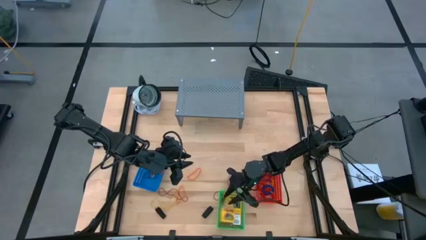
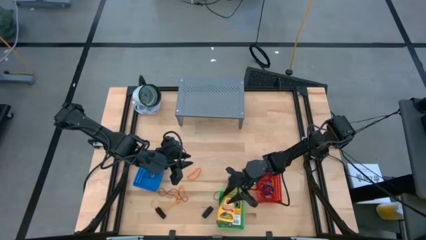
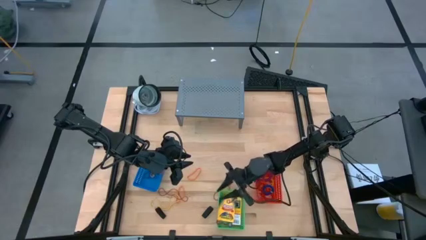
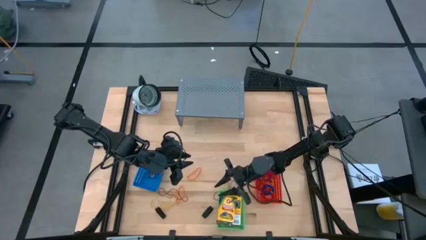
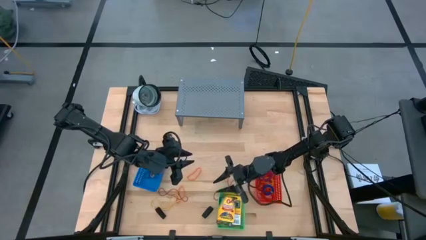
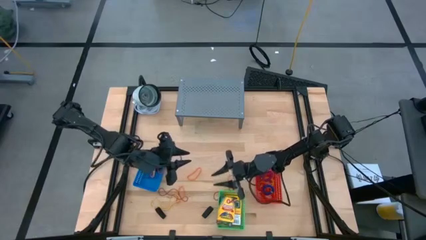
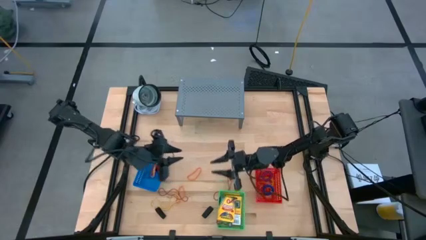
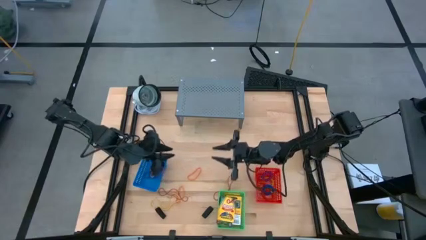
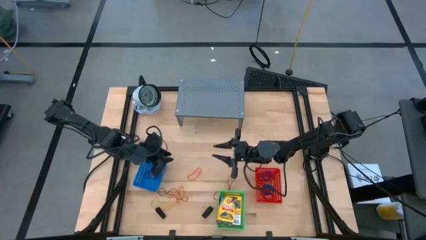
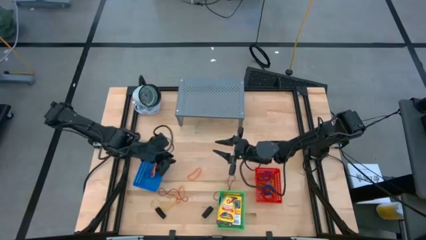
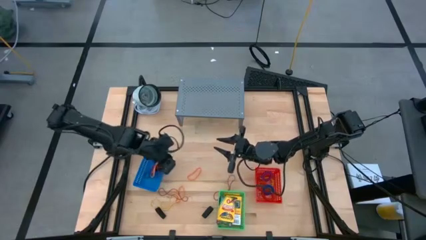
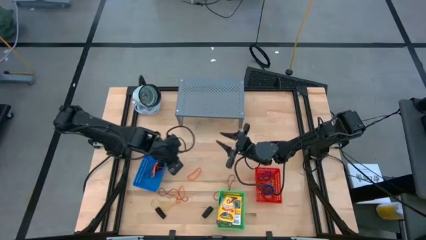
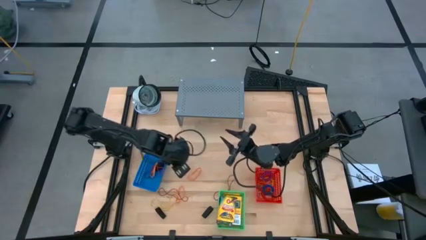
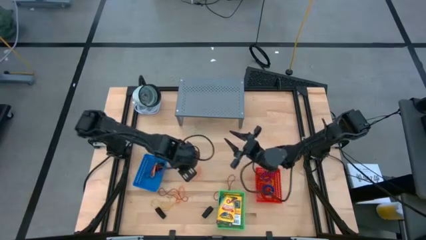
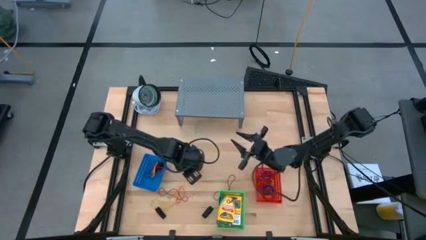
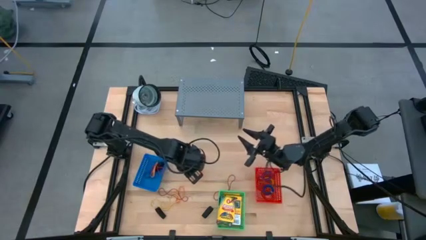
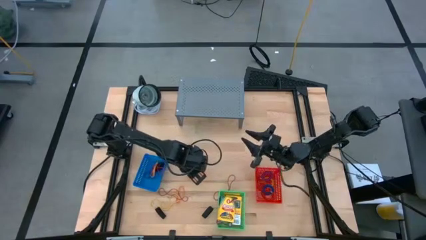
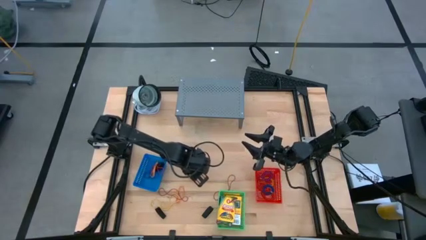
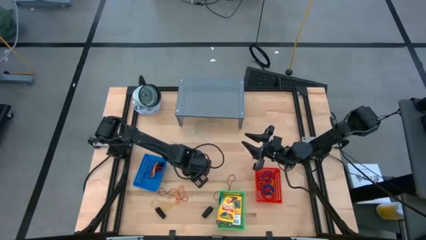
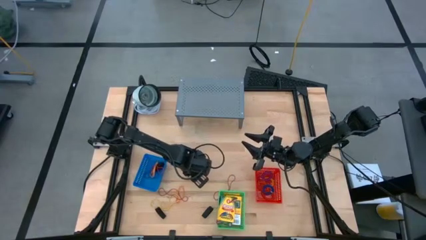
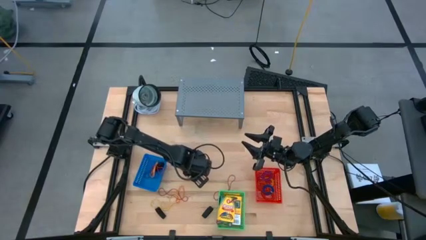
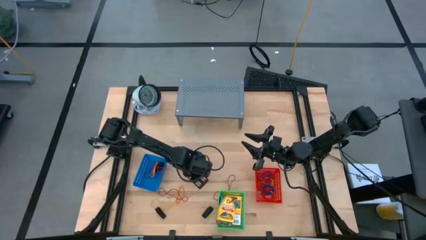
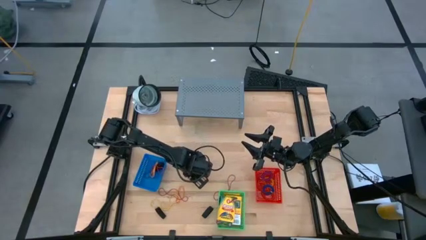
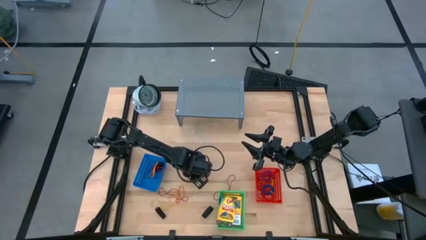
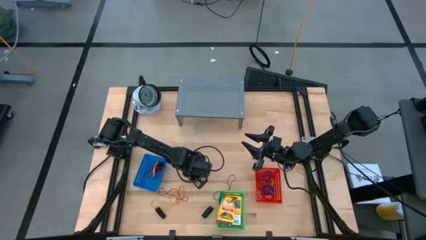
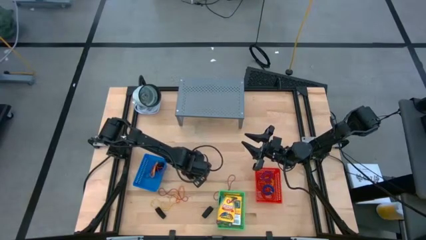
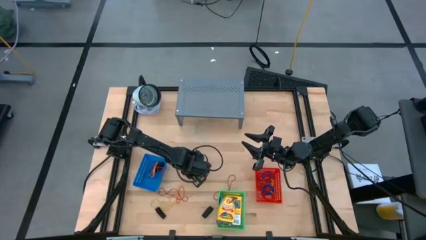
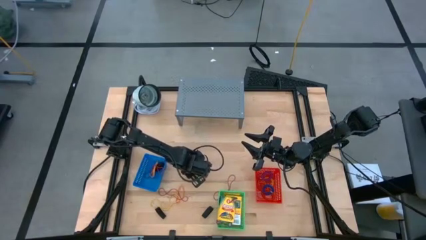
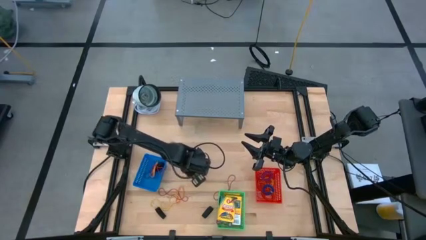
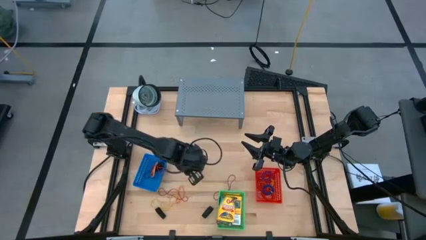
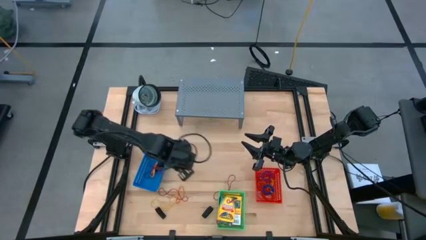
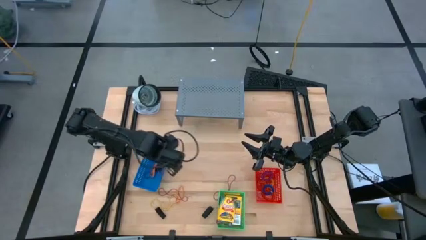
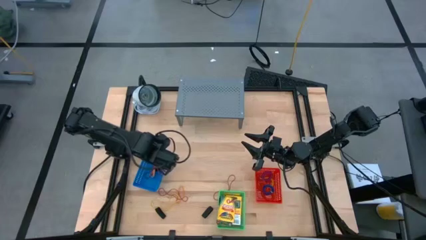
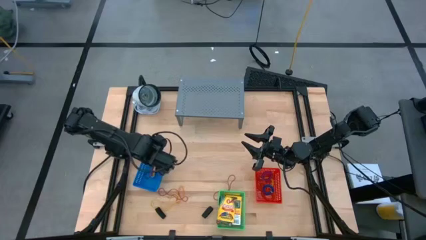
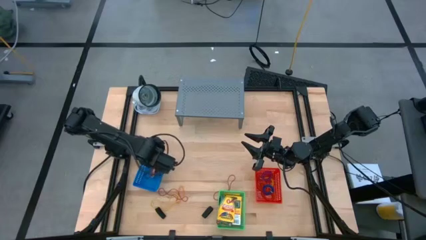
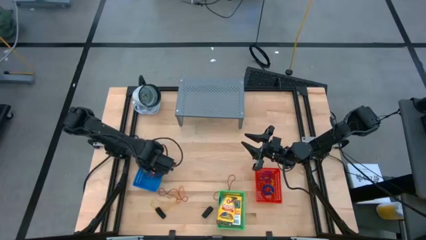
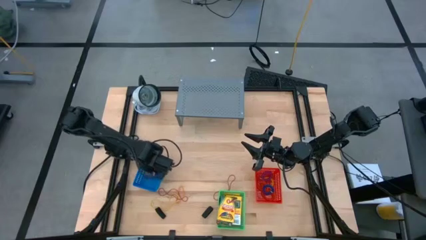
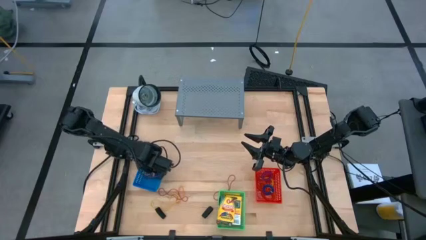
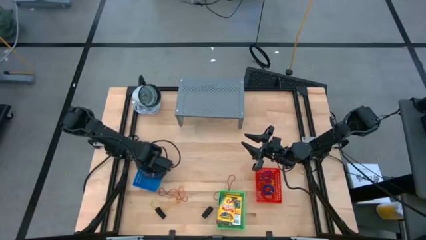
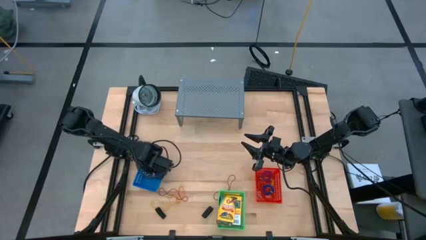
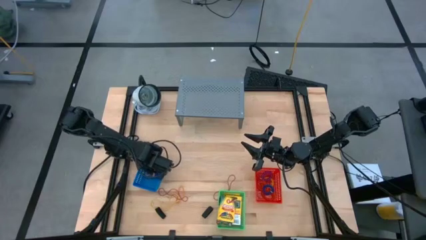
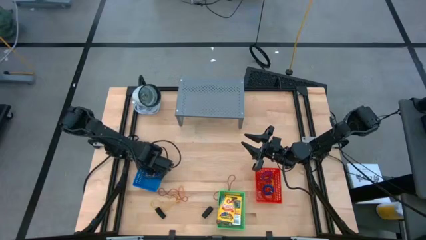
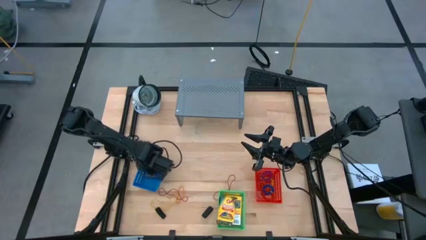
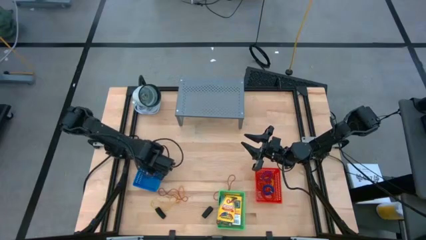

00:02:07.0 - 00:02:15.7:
Task: Pick & Place Office Desk Supplies
Put the orange rubber band into the blue bin

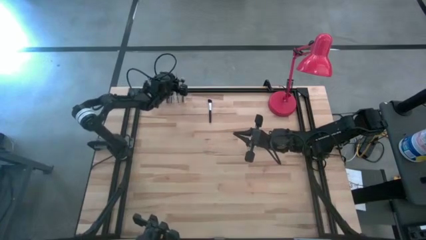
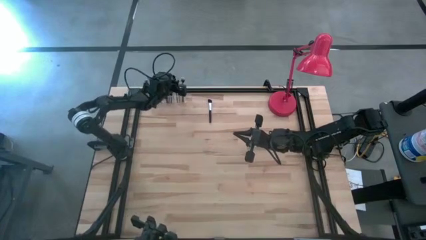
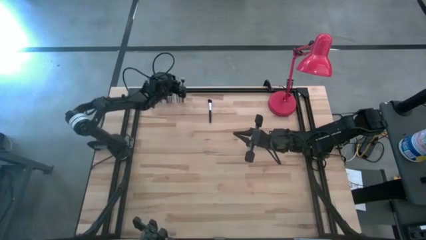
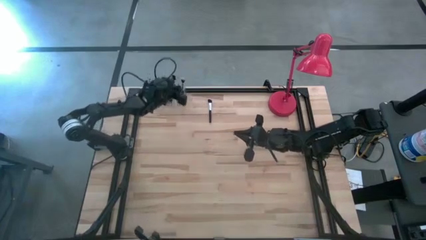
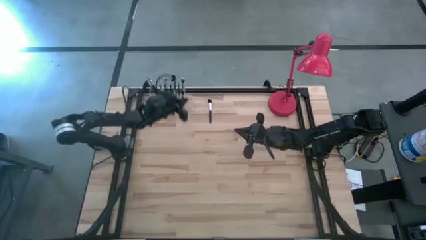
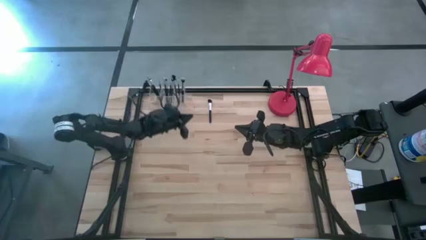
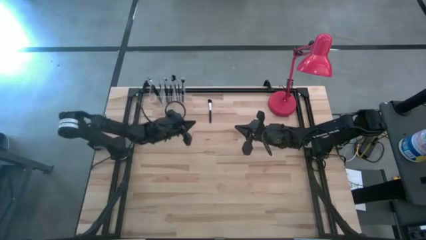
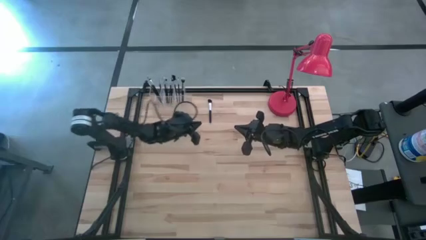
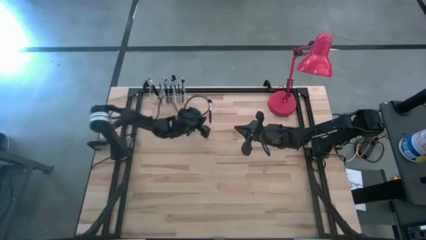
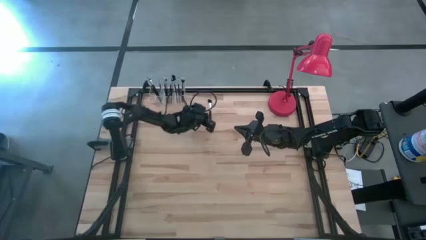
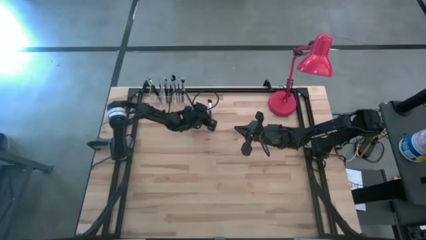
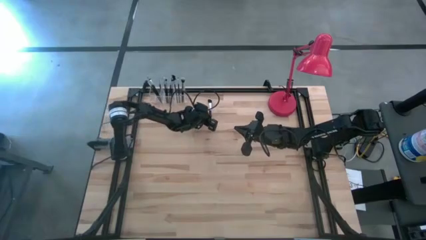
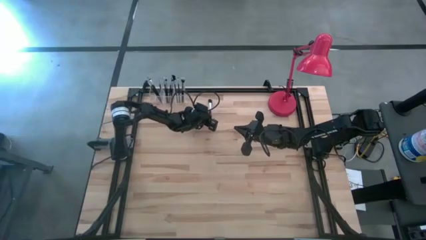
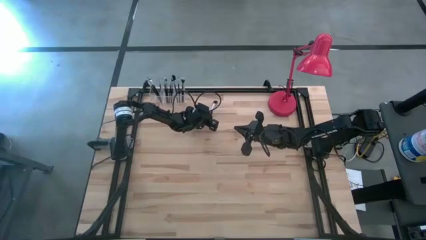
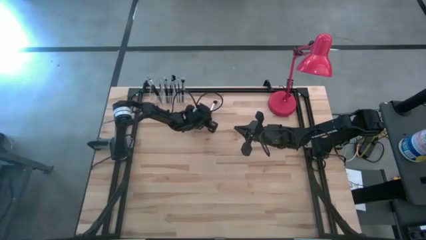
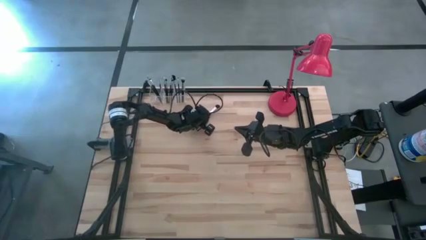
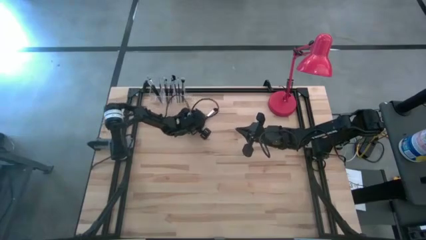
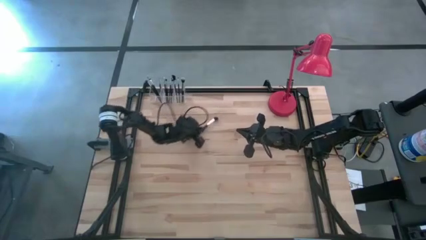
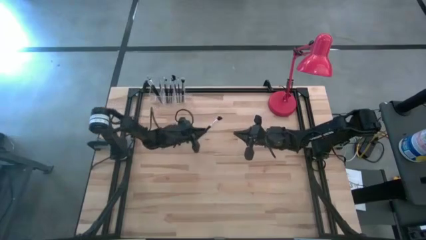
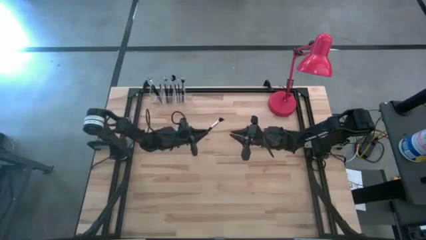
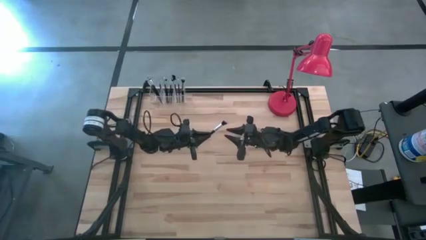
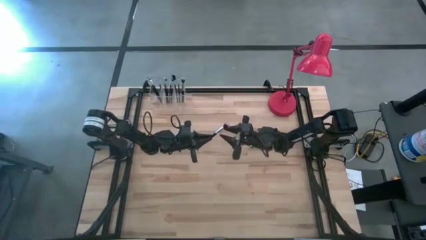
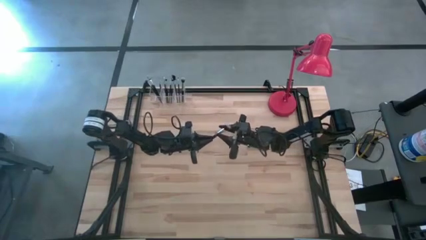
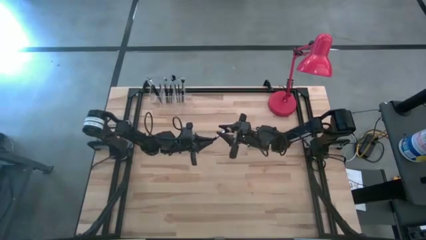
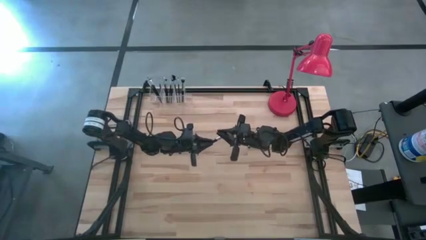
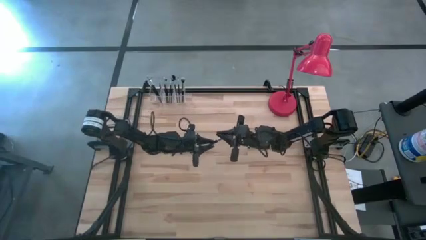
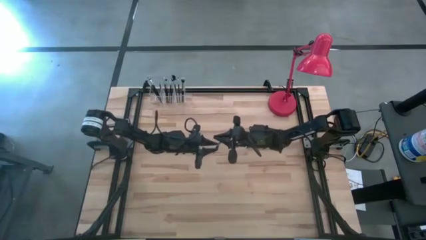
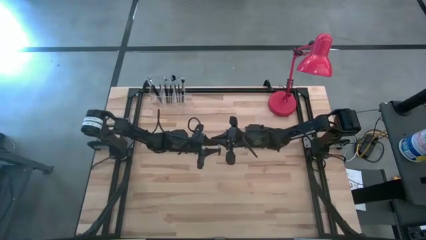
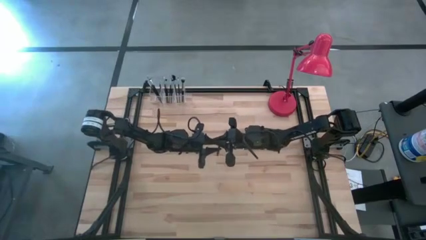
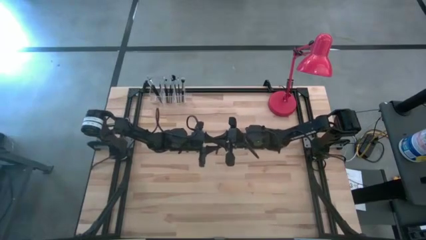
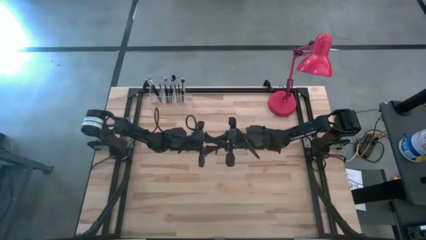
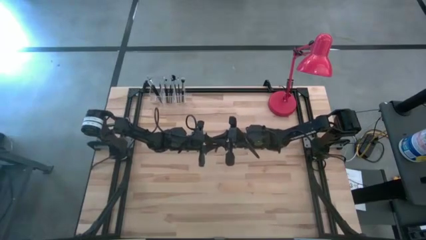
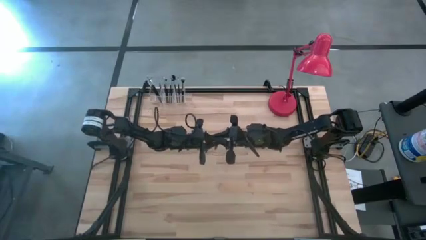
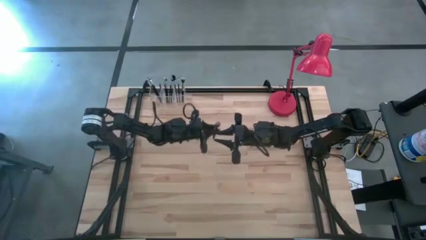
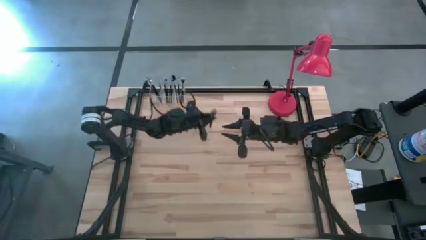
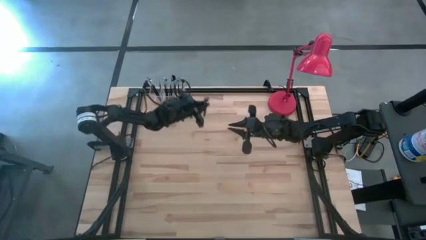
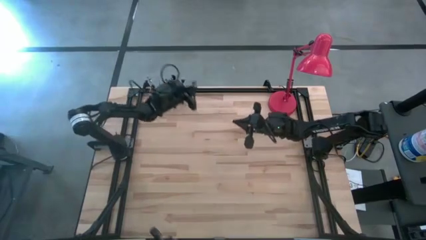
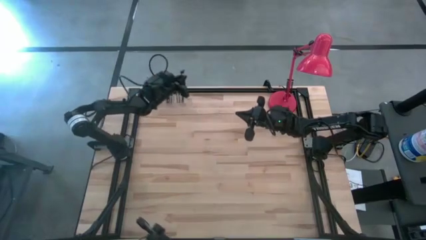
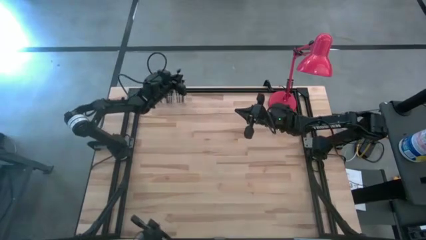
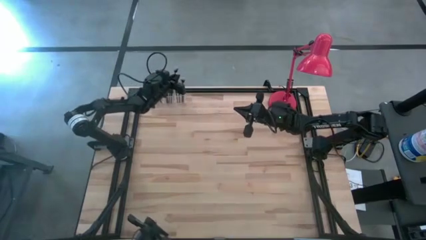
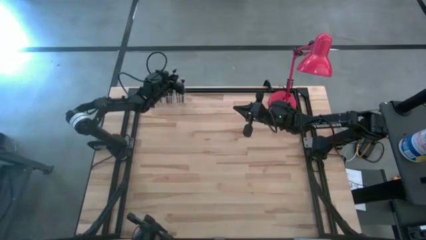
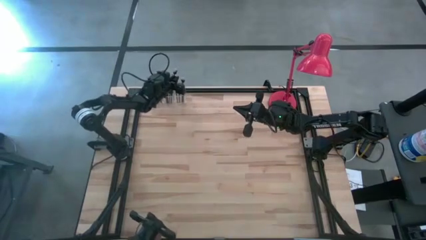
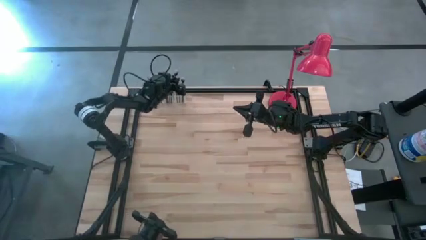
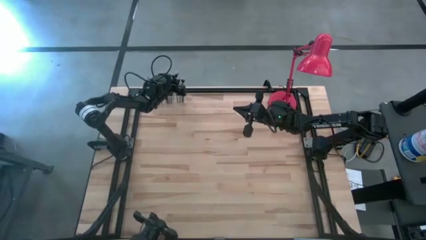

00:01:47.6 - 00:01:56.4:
Task: Pick & Place Makeup Brushes
Put the powder brush into the transparent organizer
